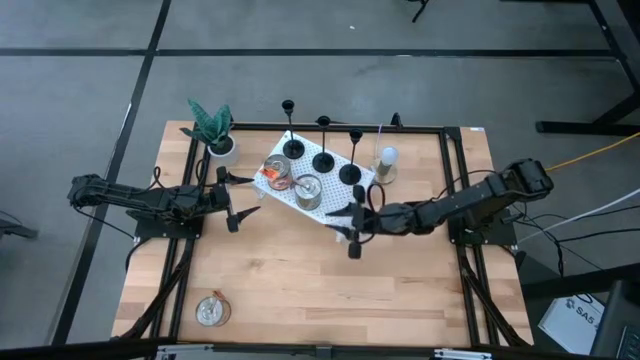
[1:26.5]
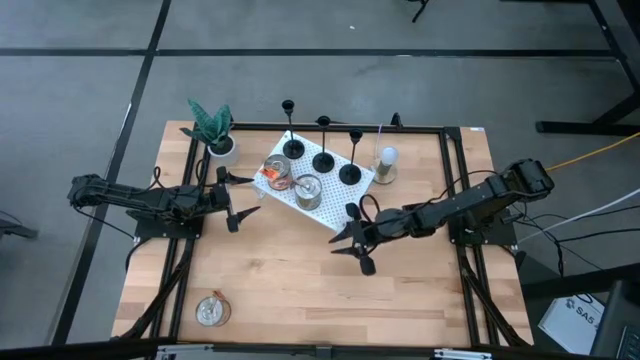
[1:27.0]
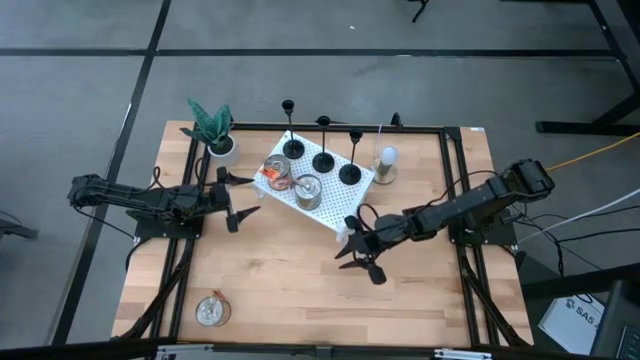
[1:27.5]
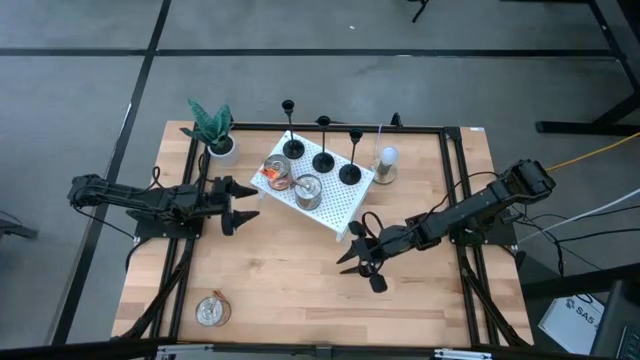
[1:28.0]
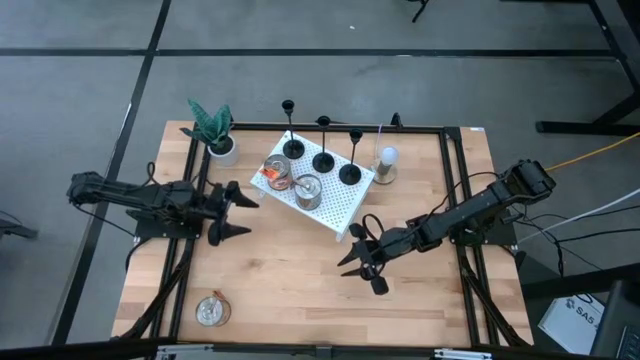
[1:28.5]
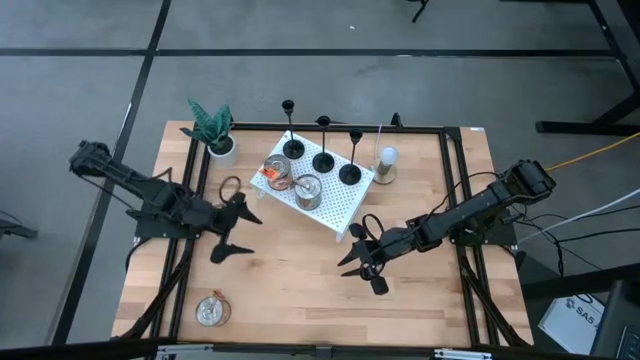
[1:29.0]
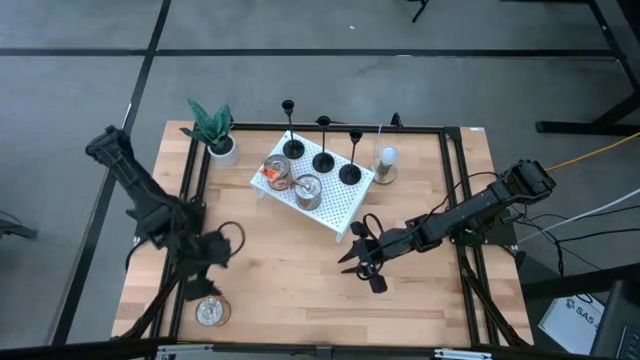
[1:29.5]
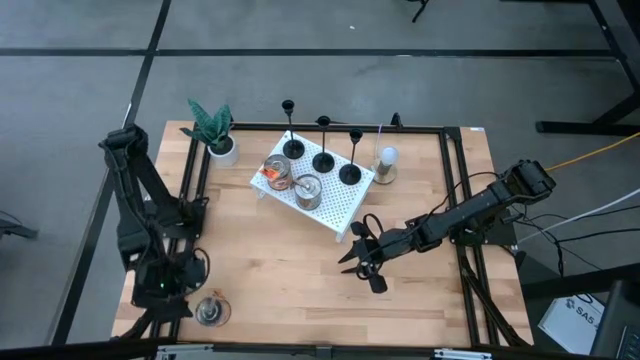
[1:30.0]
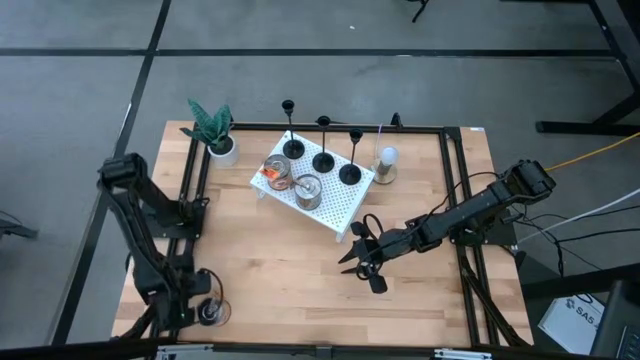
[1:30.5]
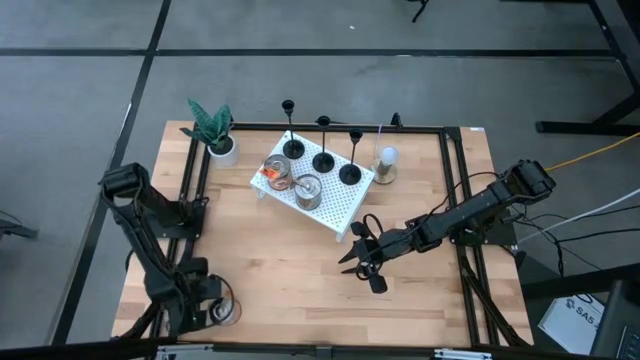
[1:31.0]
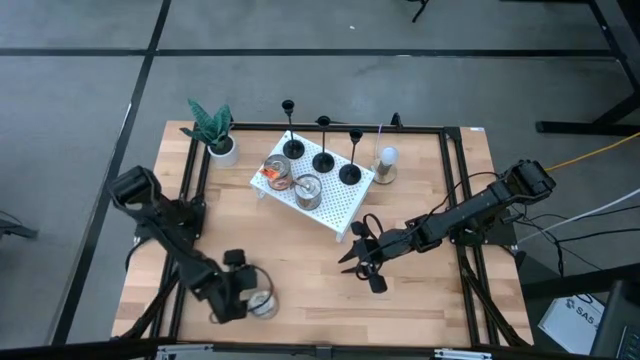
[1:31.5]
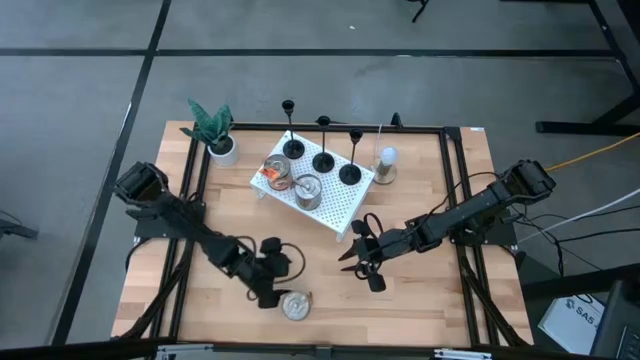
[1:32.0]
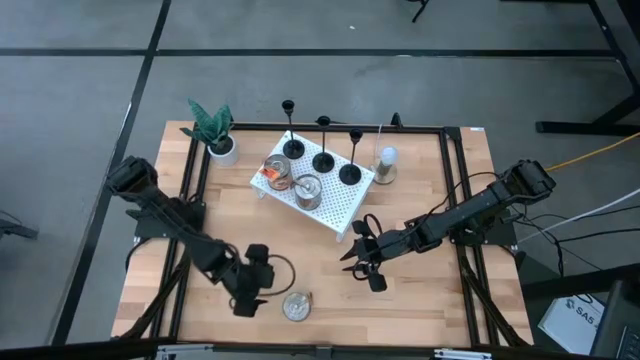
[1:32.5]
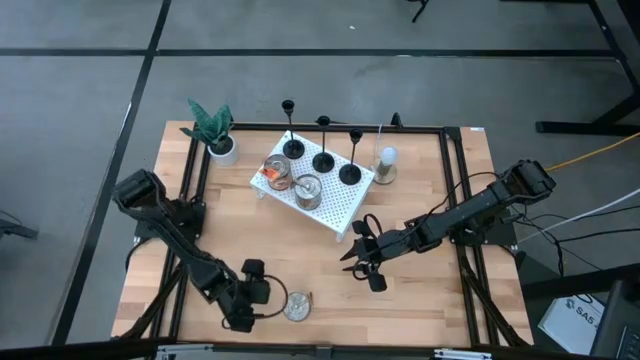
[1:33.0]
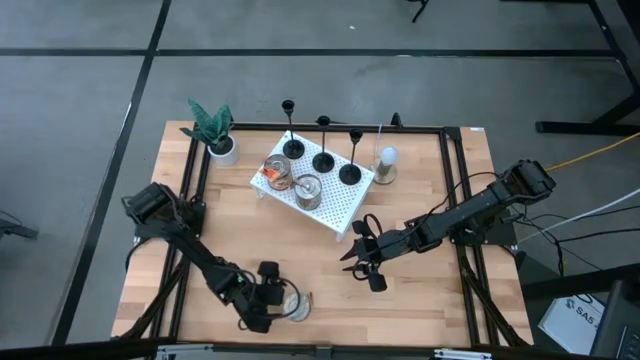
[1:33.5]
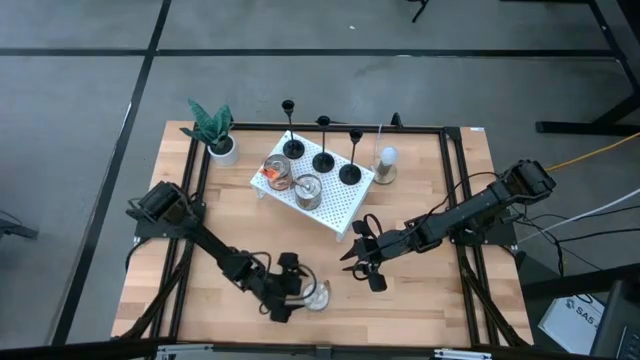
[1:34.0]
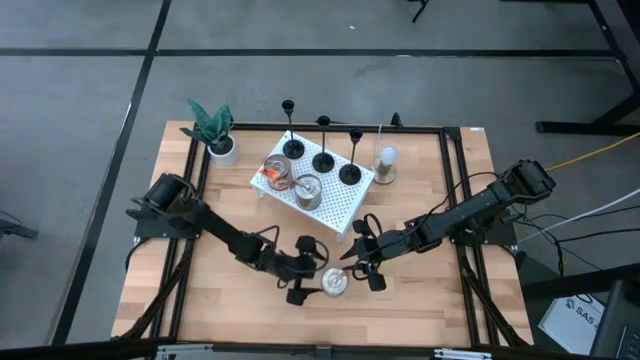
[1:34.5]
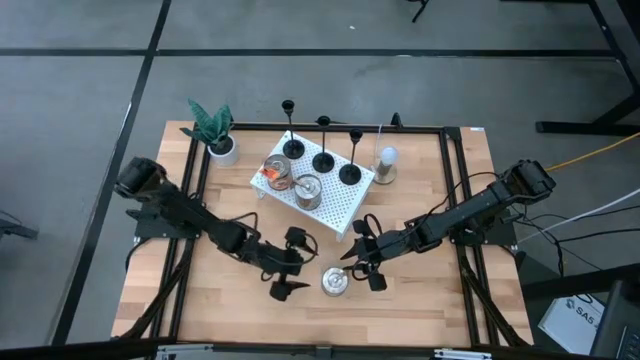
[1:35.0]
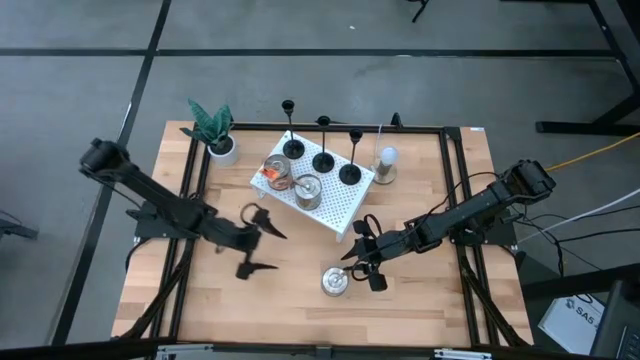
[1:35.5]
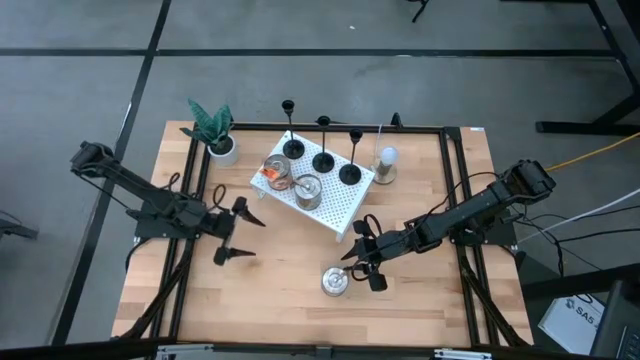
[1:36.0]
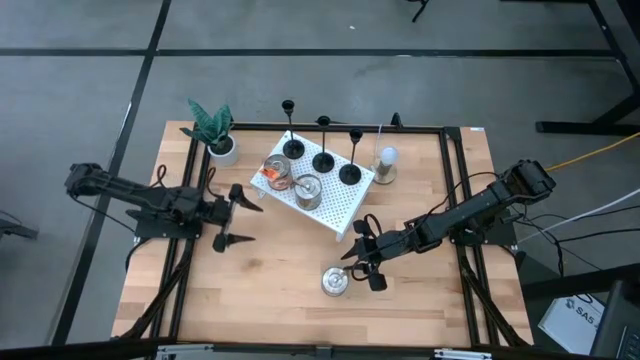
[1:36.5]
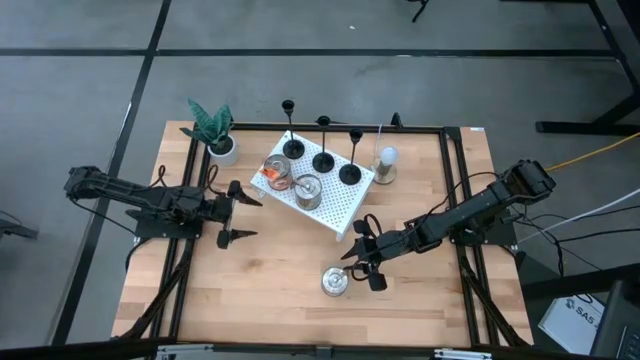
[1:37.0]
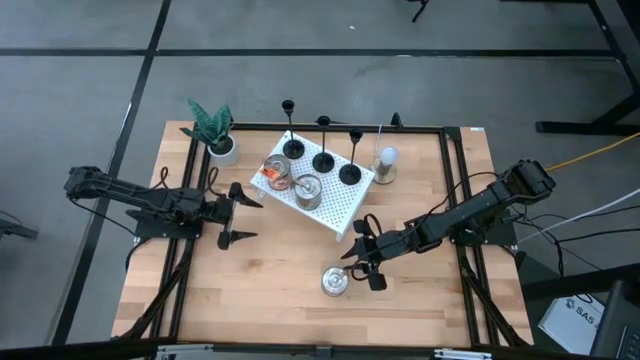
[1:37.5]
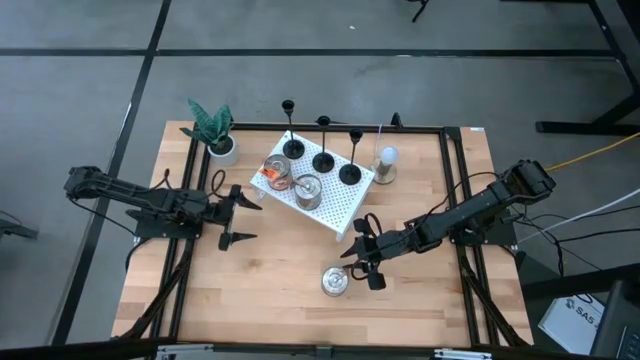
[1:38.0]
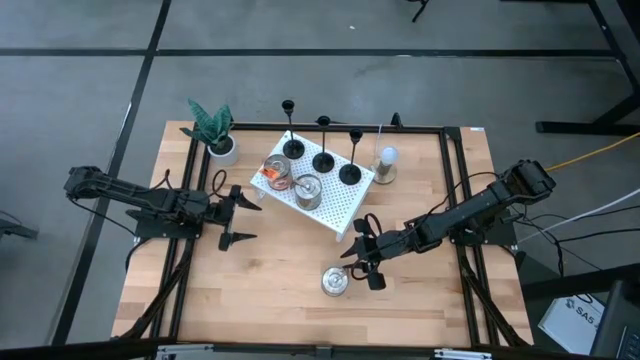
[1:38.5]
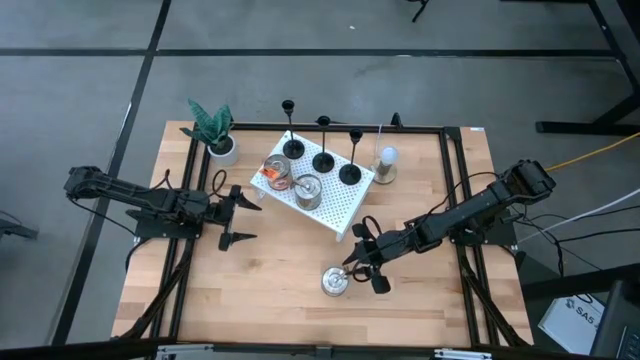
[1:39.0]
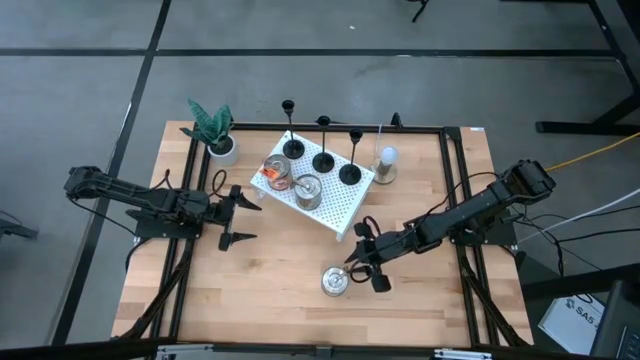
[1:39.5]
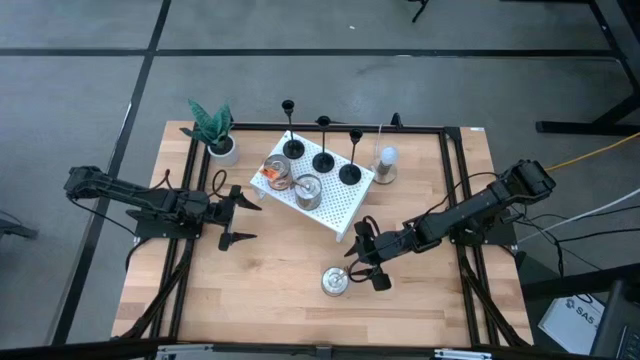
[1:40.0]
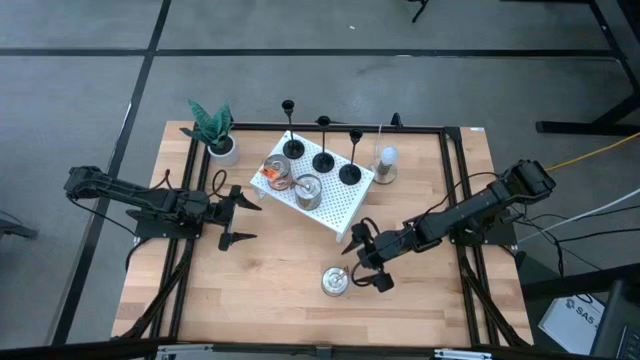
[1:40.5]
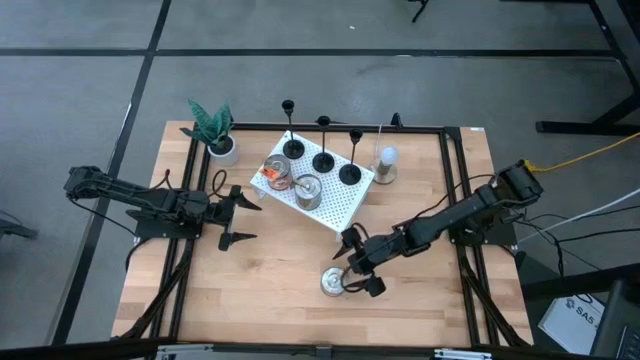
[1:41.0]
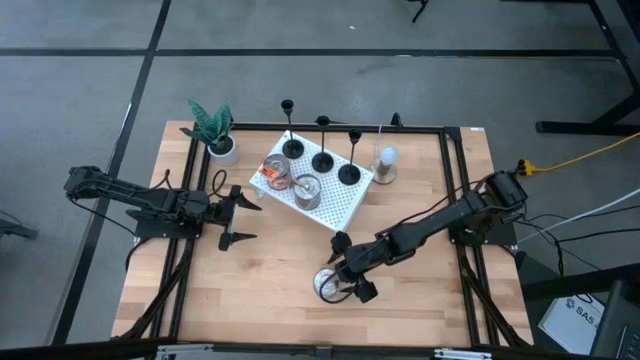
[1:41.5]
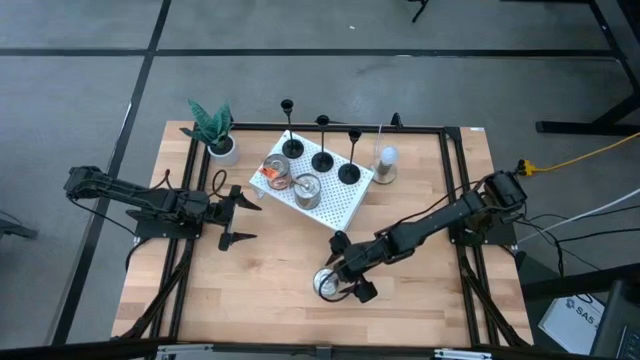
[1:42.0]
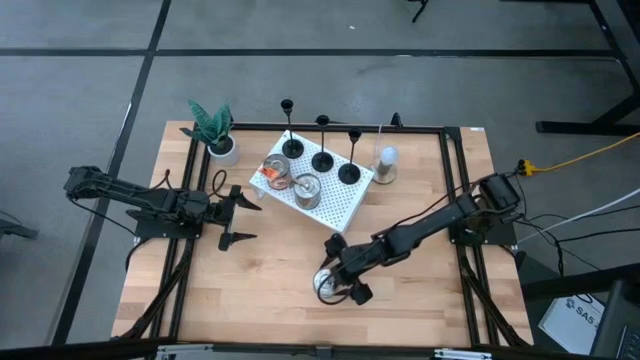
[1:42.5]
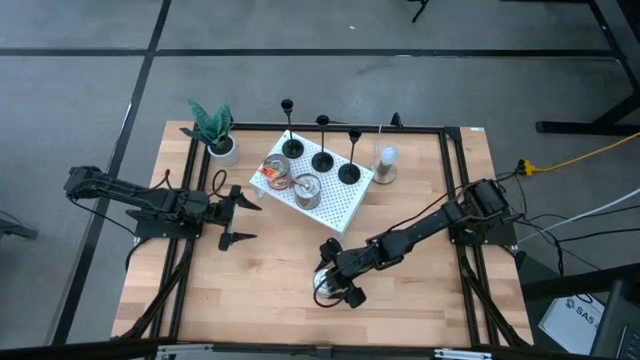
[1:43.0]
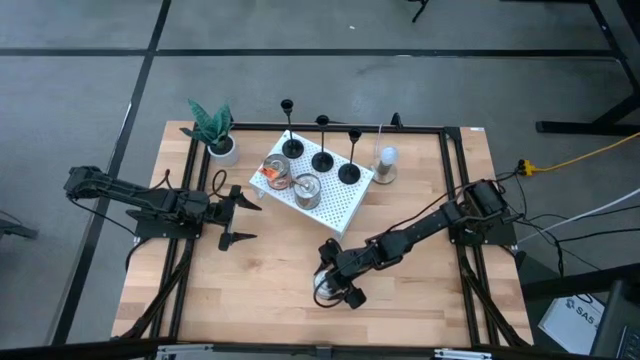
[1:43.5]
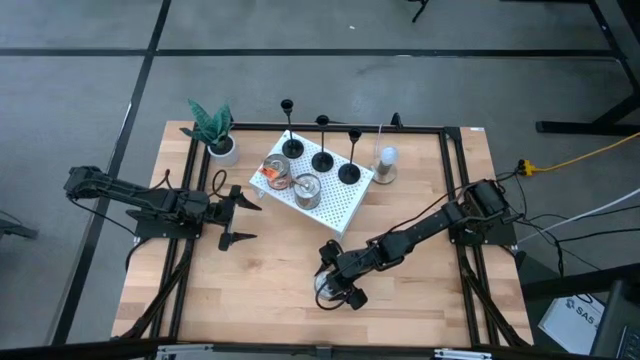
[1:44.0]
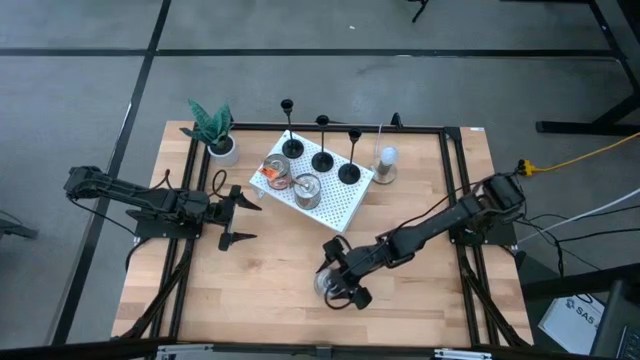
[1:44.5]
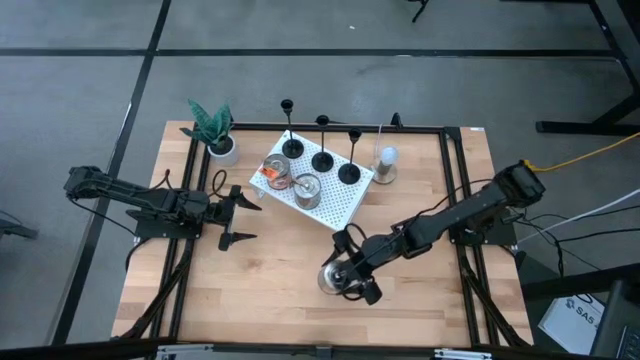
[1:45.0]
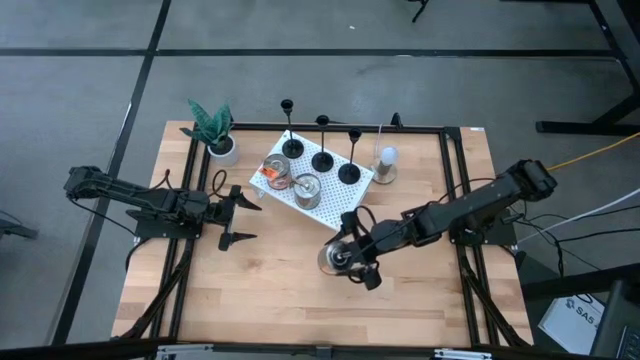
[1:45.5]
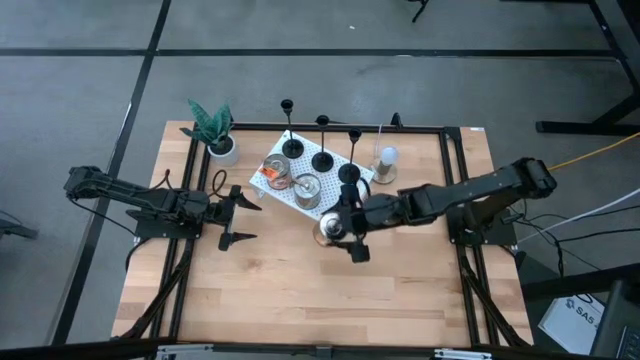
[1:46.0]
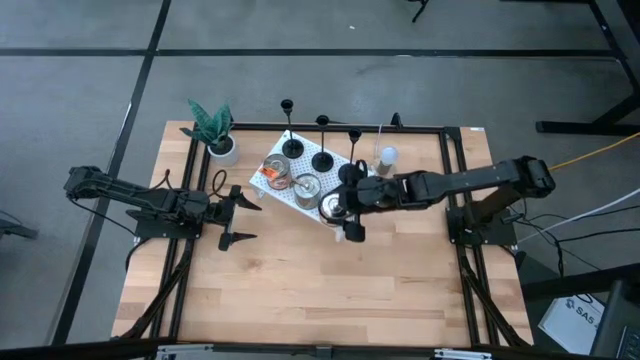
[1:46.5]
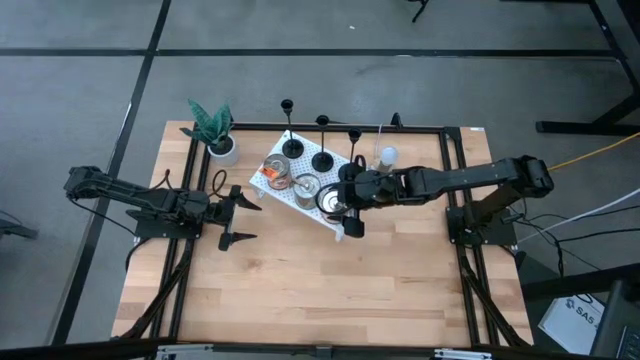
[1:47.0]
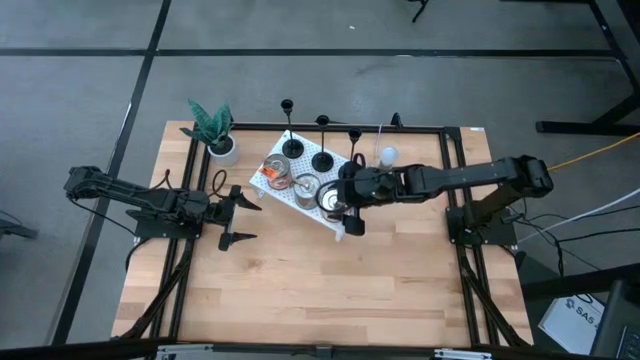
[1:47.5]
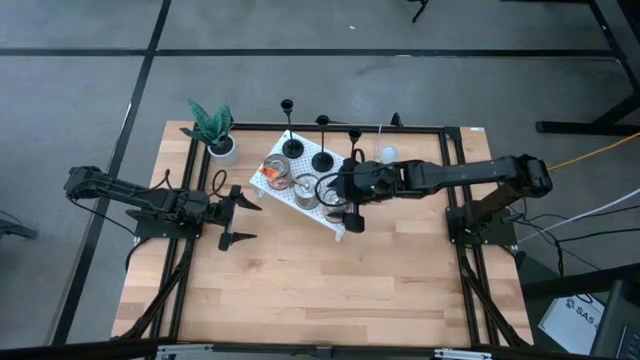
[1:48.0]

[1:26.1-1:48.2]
Task: Pick & Place candle stick holders
Put the orange scented candle on the shelf
